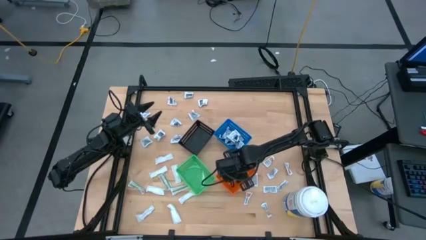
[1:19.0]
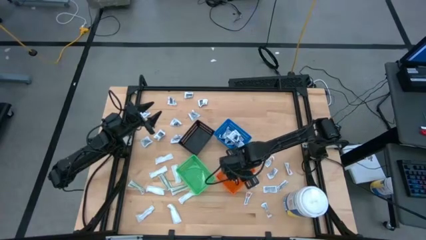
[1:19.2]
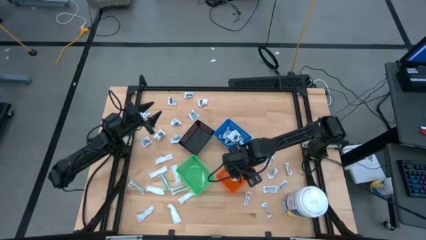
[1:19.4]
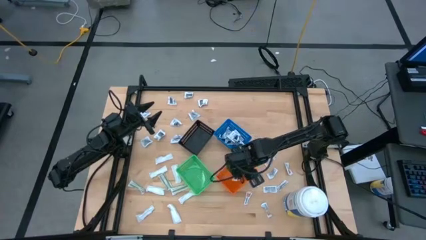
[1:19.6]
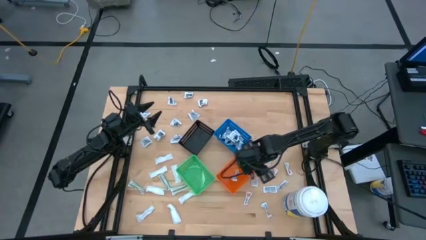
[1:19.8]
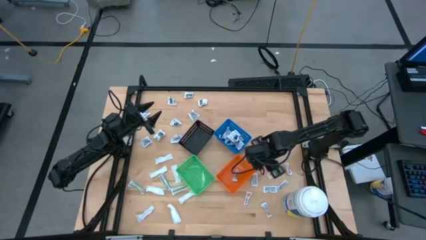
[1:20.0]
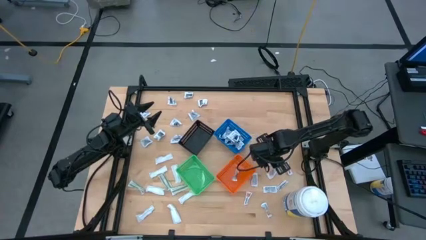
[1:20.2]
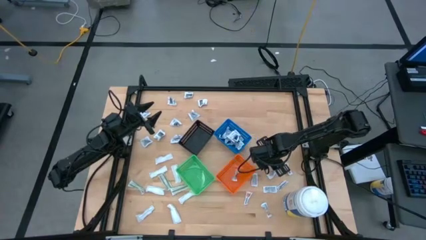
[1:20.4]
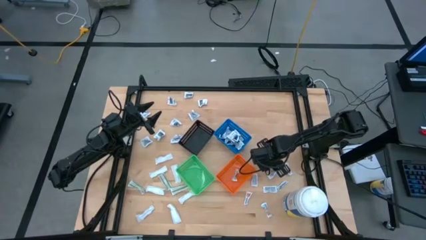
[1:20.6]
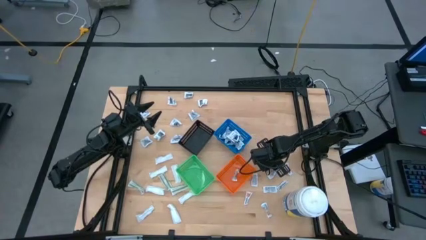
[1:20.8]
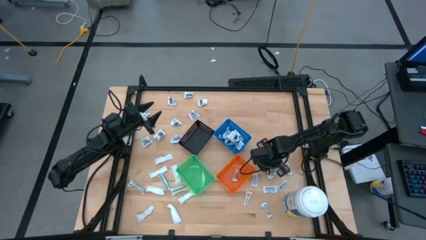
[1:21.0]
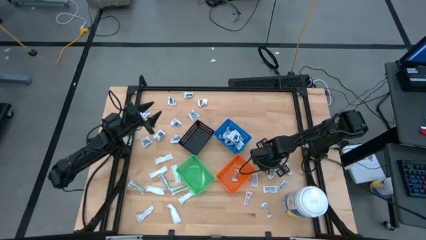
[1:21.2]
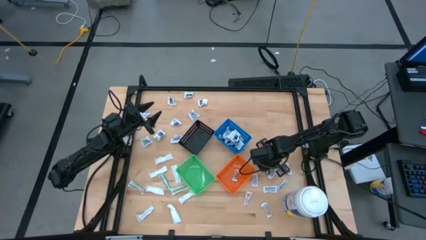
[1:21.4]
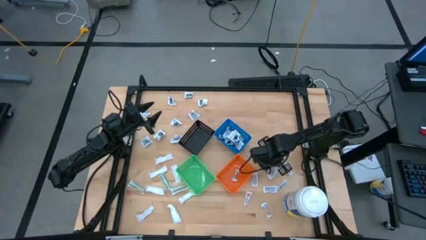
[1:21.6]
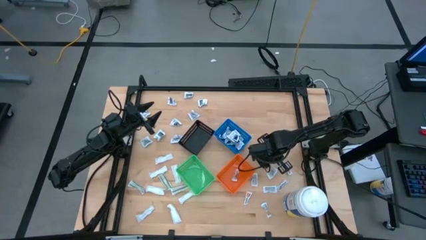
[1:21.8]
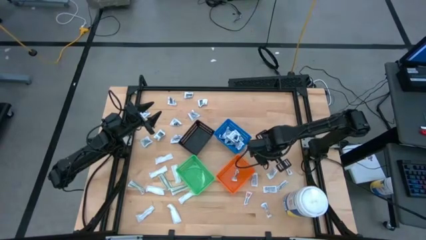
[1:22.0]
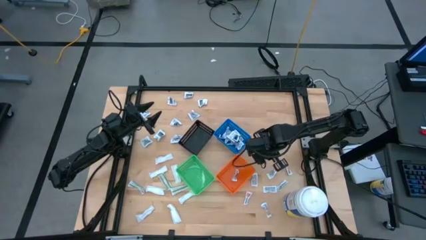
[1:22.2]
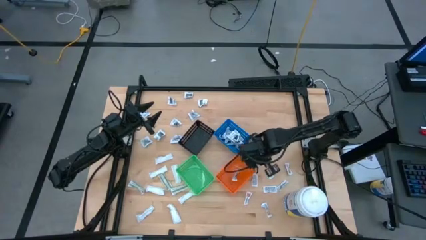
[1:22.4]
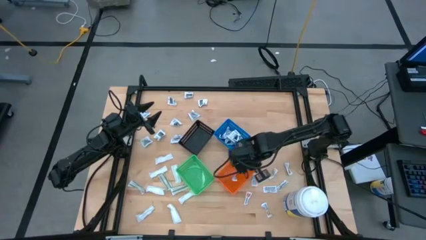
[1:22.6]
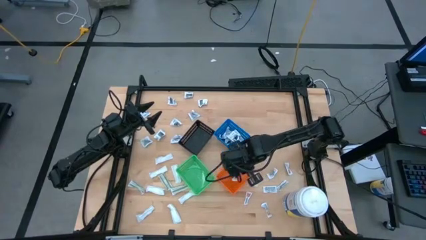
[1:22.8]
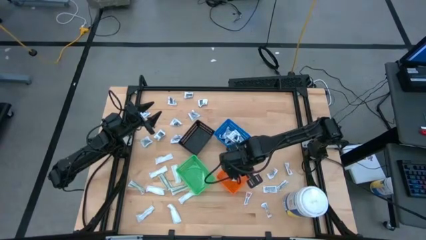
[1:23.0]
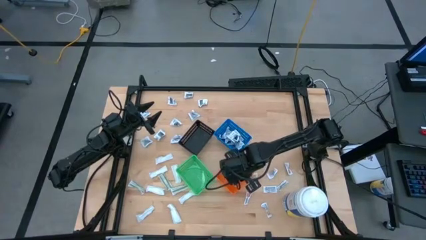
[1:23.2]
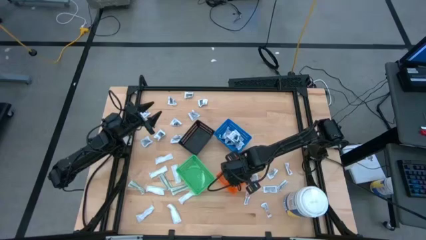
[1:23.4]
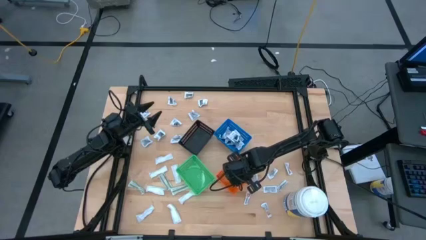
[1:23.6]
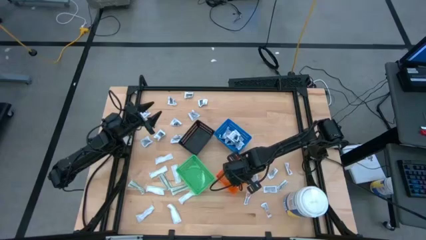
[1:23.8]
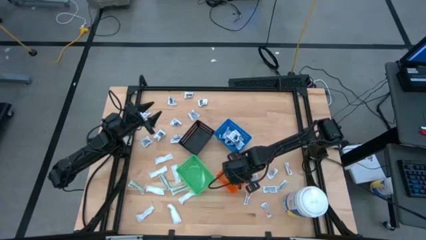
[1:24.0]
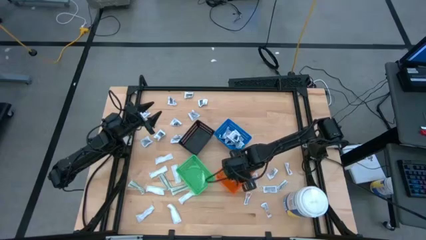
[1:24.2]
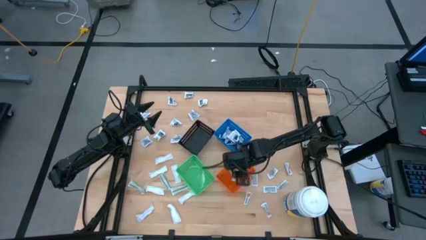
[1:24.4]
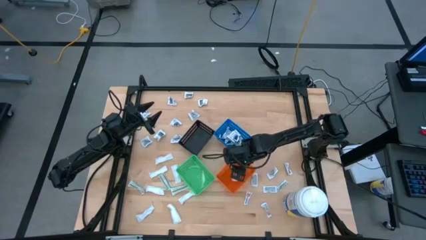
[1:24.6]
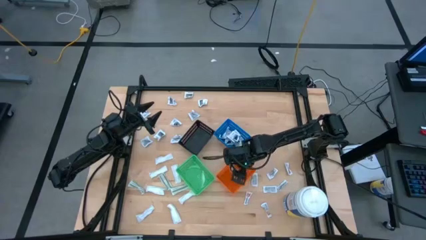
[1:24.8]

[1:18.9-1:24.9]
Task: Pick & Place First Aid Supplies
Put the orange ointment pack into the orange bin

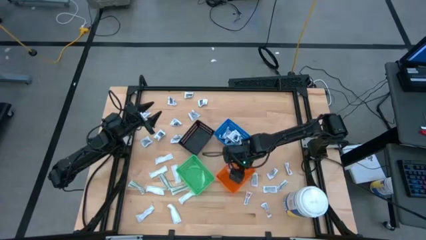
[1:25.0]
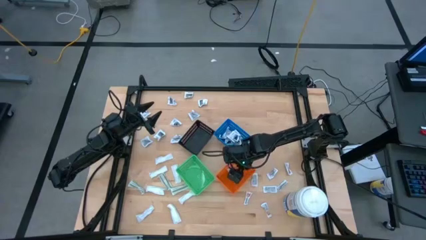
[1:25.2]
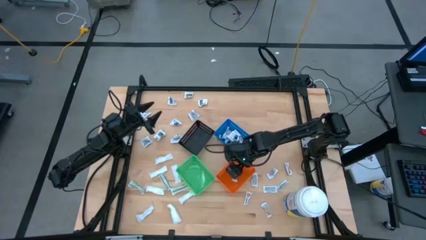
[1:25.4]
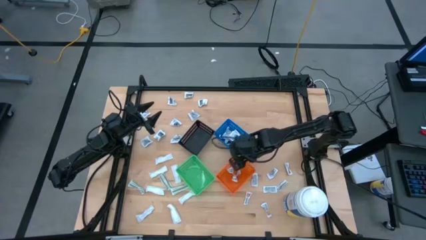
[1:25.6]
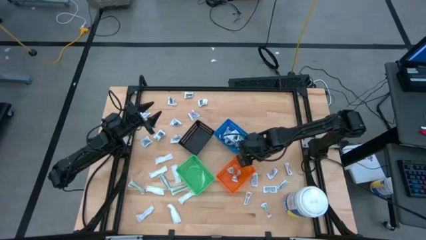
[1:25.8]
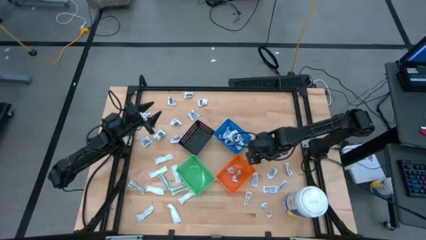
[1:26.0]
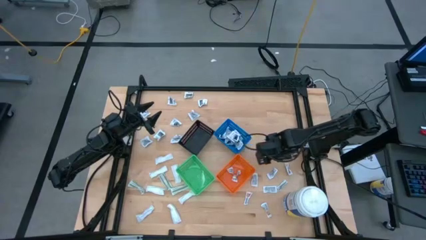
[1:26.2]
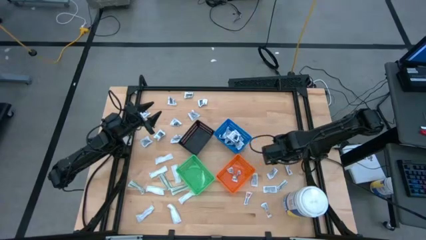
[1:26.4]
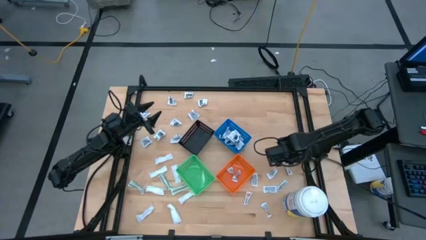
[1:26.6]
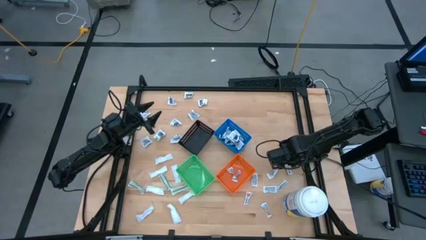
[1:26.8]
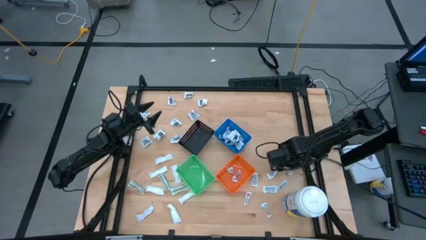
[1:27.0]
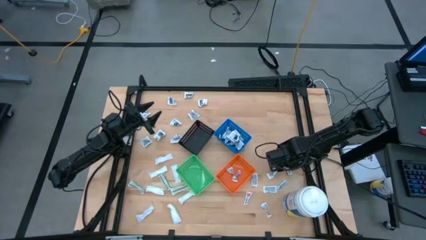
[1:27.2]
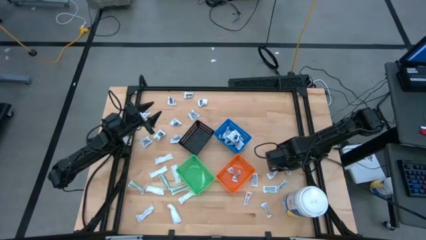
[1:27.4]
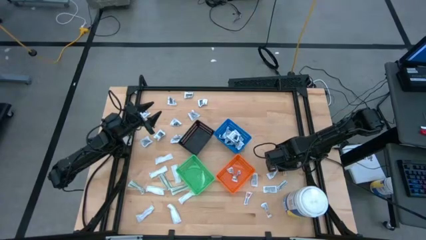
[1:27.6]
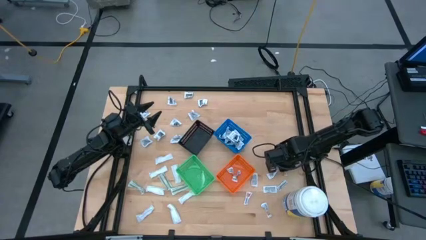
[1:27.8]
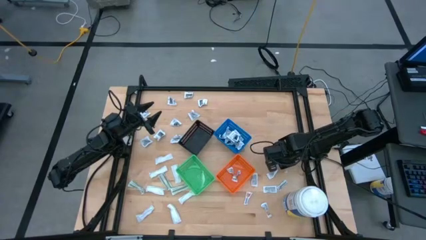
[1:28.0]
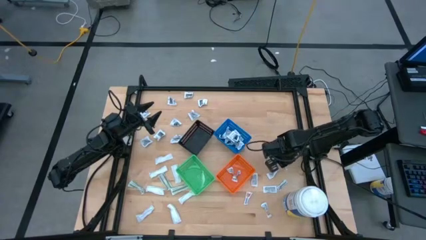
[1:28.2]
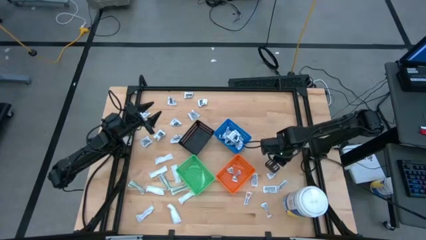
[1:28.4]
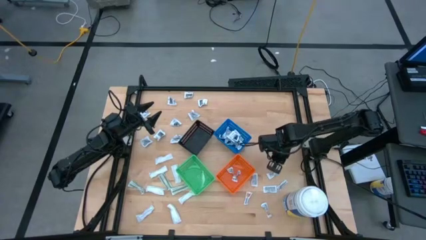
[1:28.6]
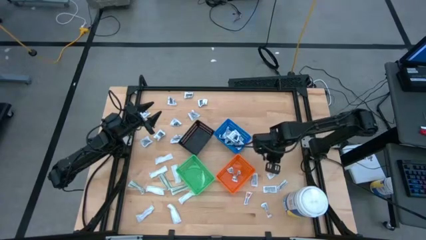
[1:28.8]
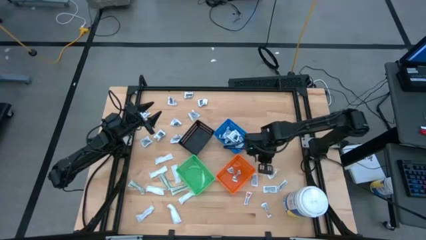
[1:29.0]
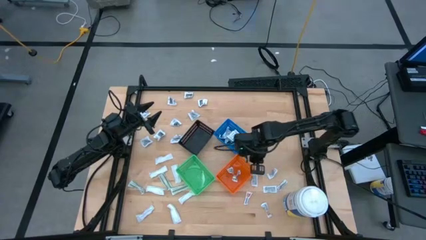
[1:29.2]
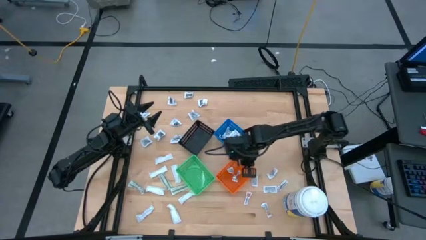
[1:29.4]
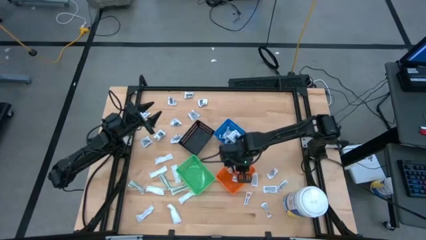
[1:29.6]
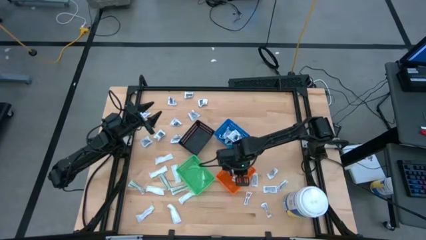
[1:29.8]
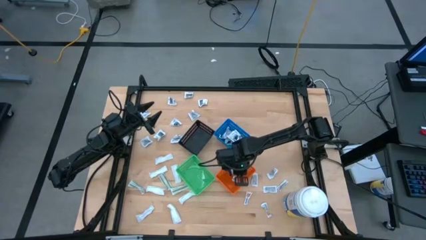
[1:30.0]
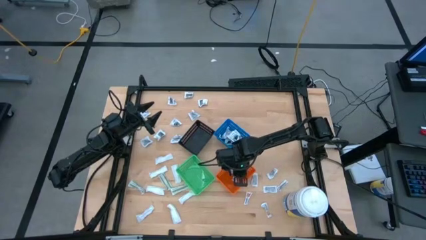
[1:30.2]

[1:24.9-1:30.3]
Put the orange ointment pack into the orange bin

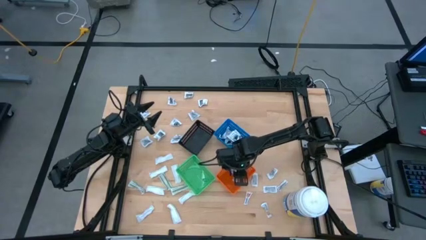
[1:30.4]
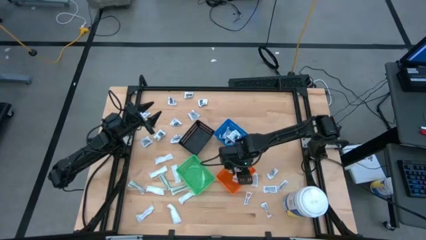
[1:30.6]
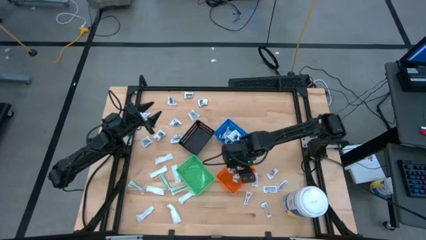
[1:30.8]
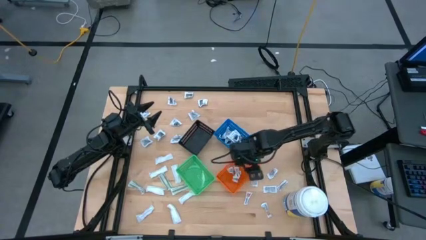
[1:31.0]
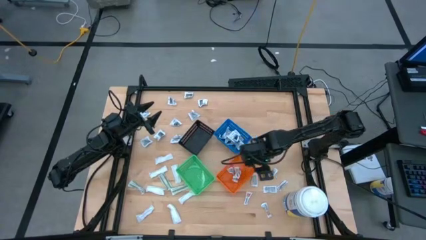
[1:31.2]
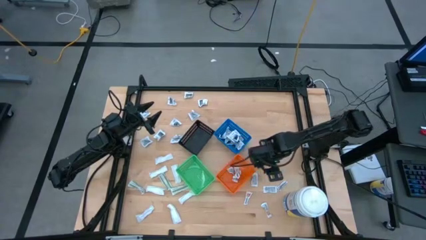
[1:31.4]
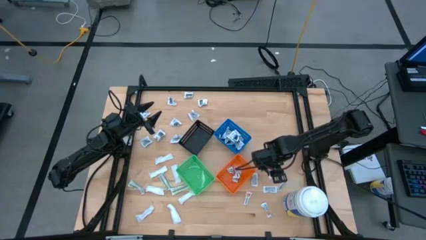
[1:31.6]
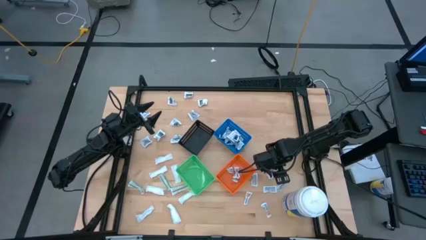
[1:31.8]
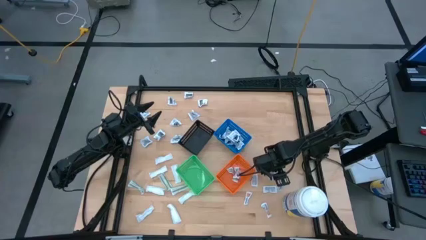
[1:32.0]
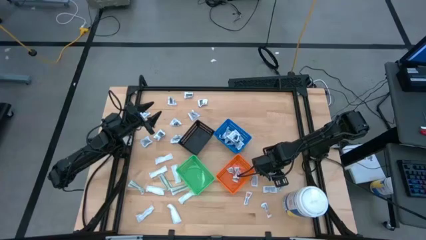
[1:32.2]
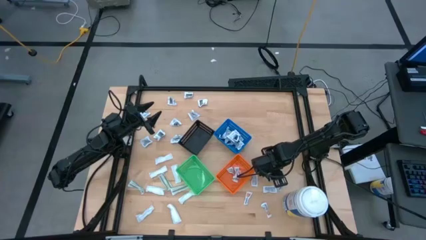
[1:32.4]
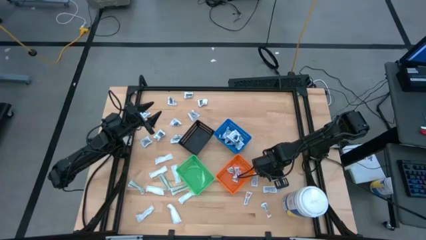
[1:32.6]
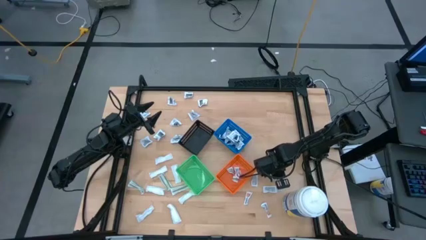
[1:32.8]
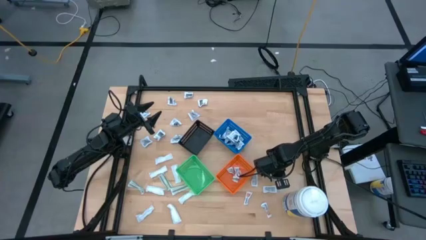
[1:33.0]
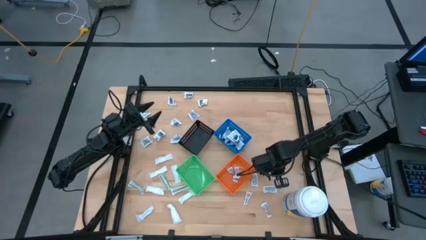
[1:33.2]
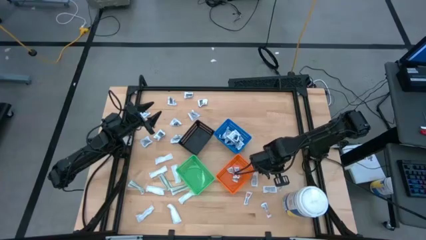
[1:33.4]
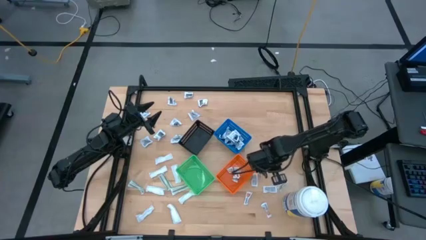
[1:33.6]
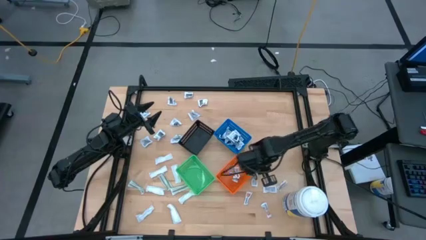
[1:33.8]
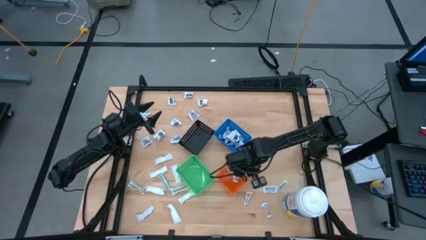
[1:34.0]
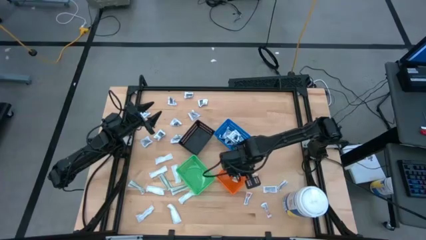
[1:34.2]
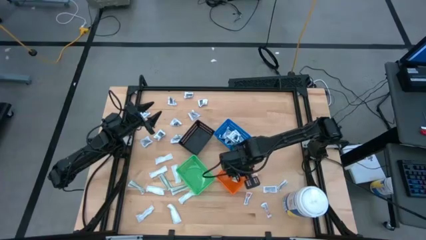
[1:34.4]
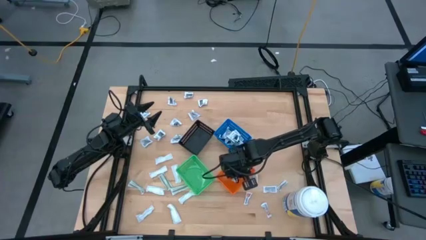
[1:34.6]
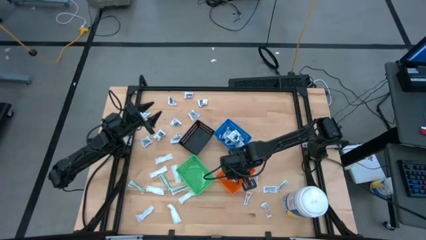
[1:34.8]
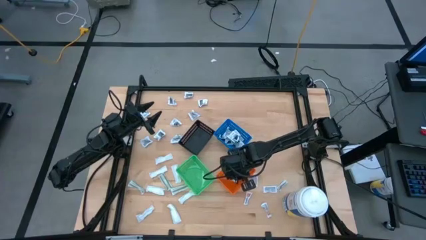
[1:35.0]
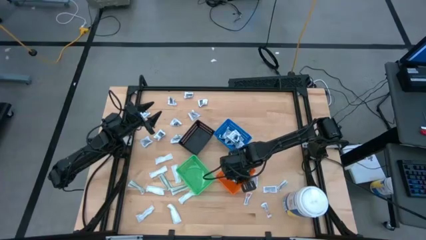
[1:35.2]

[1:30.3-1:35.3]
Put the orange ointment pack into the orange bin

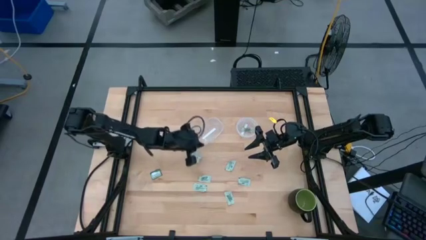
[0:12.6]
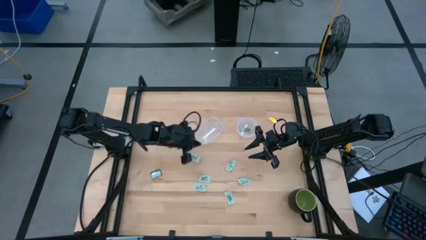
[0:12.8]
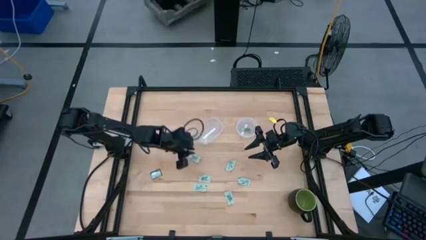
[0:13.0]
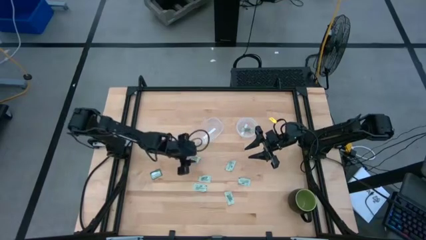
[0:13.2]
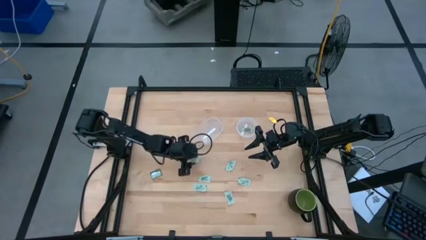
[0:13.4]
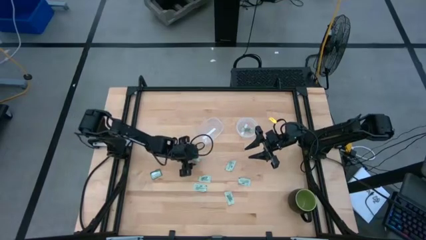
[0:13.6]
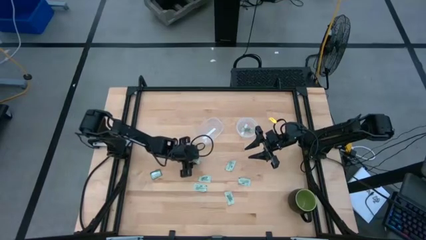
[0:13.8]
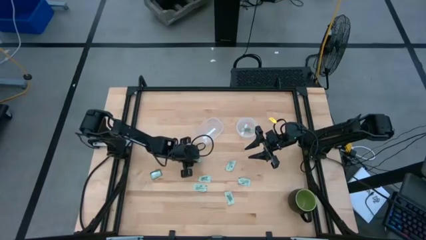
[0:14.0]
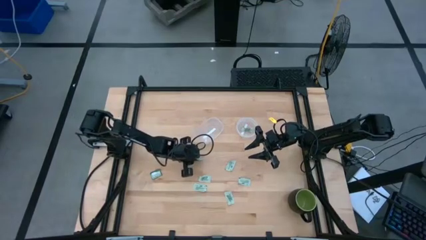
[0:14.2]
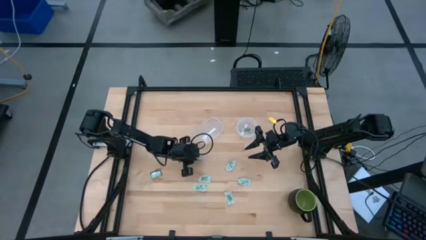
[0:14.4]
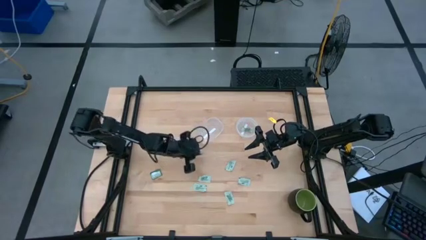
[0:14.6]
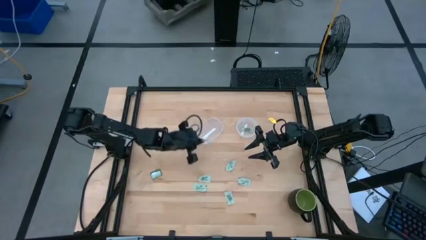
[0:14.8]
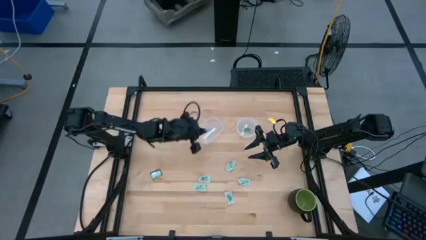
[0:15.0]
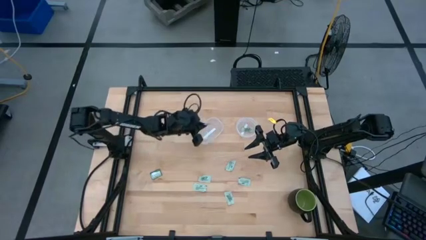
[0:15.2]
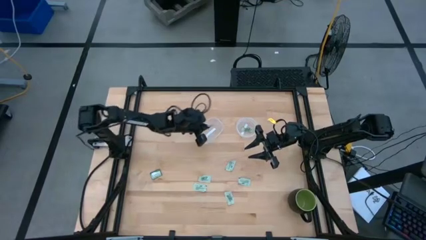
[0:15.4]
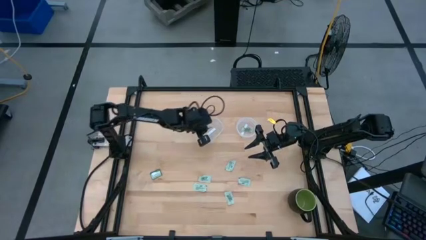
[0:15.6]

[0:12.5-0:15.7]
Task: Pick and place Stevia / Truvia into bins
Put the stevia packet into the left transparent container
